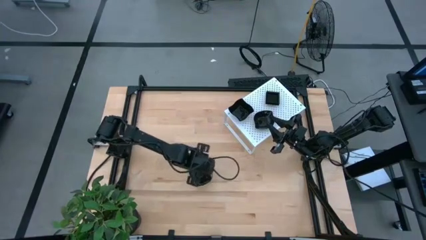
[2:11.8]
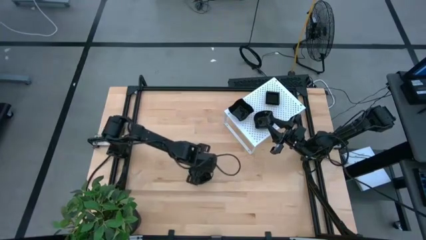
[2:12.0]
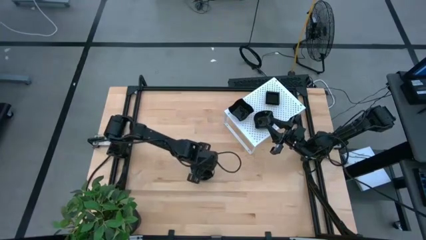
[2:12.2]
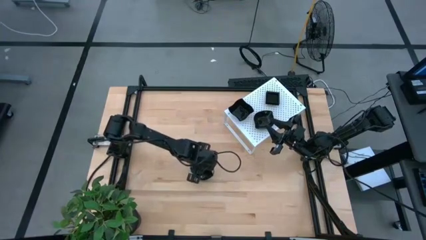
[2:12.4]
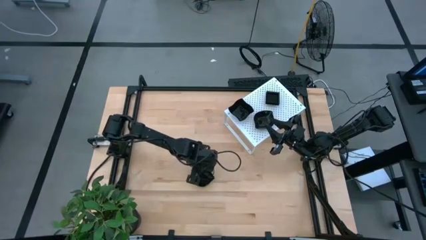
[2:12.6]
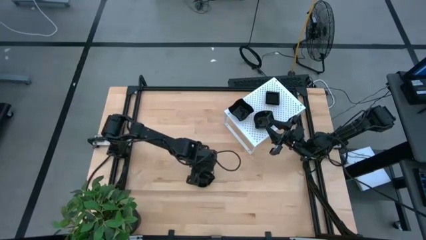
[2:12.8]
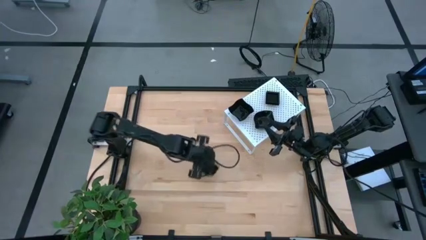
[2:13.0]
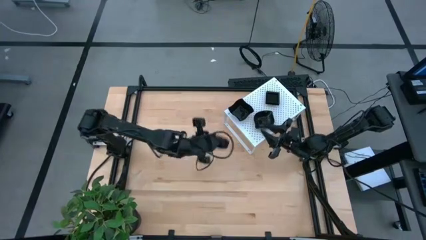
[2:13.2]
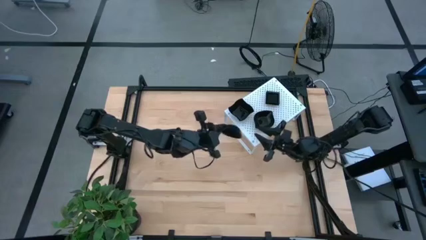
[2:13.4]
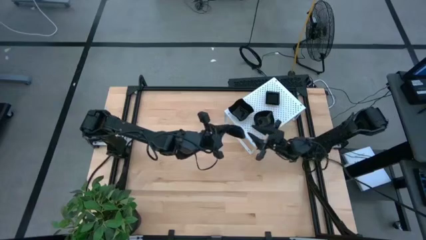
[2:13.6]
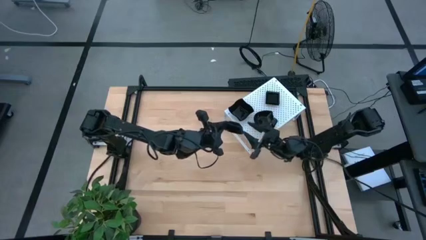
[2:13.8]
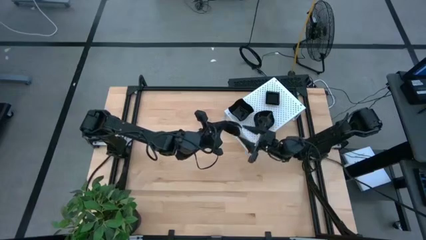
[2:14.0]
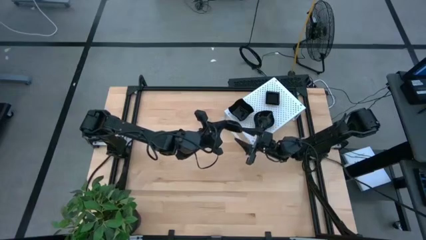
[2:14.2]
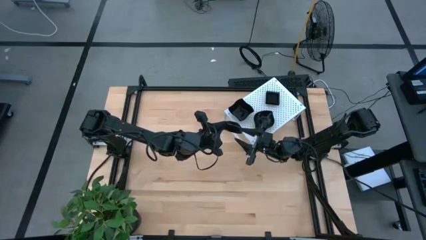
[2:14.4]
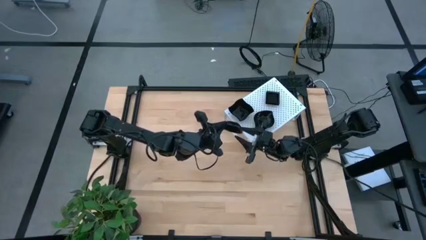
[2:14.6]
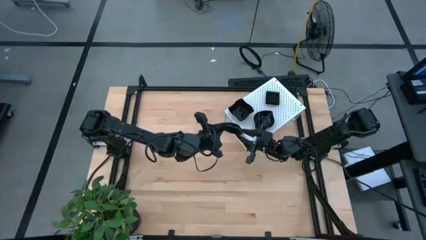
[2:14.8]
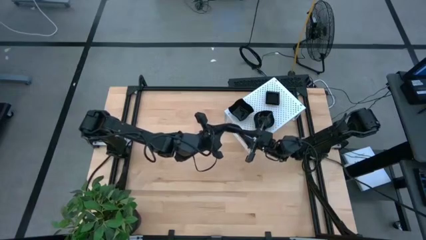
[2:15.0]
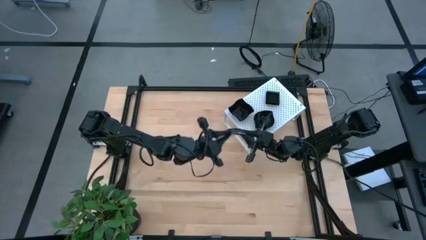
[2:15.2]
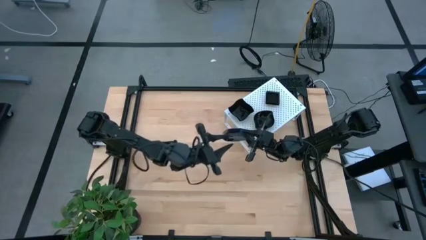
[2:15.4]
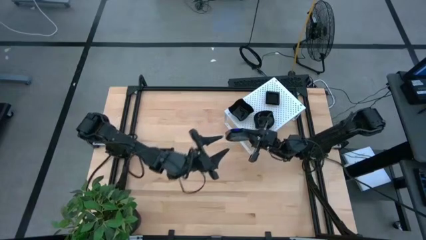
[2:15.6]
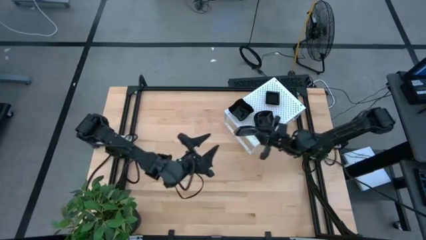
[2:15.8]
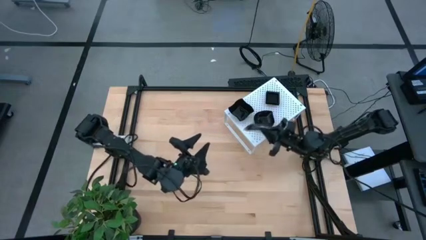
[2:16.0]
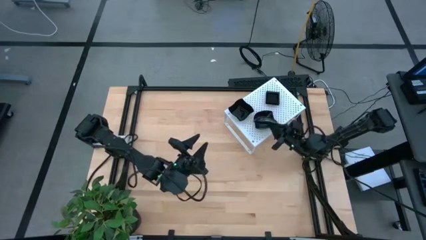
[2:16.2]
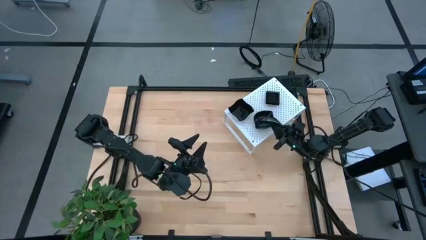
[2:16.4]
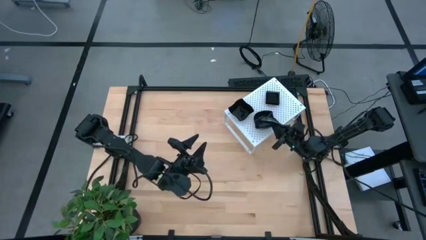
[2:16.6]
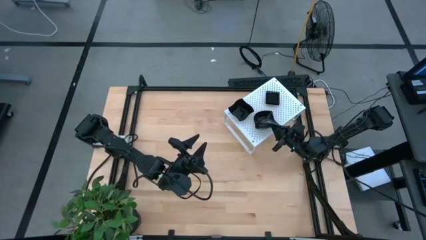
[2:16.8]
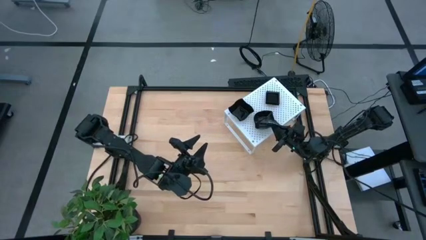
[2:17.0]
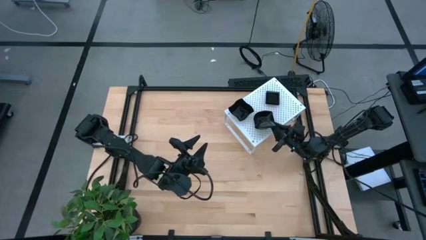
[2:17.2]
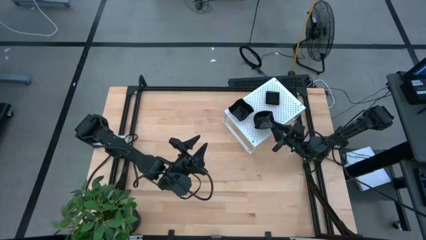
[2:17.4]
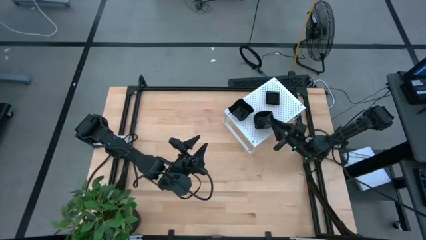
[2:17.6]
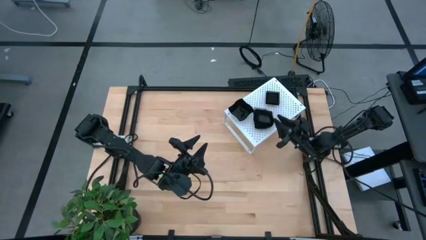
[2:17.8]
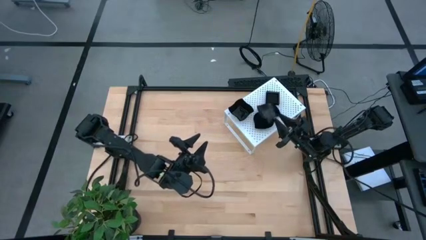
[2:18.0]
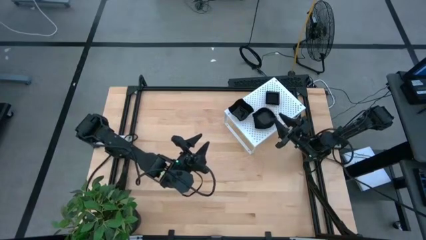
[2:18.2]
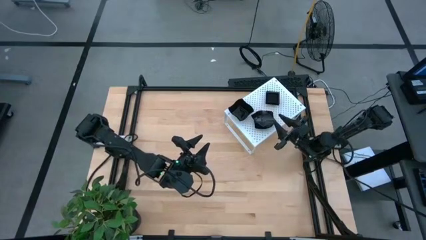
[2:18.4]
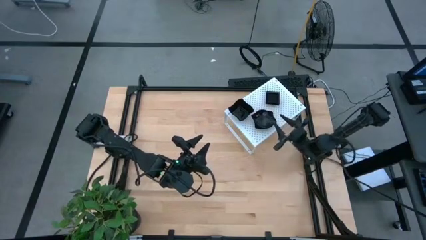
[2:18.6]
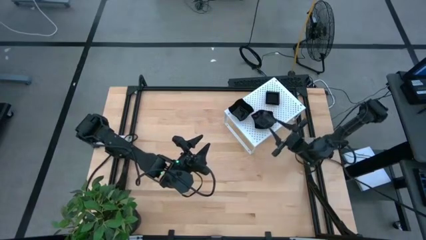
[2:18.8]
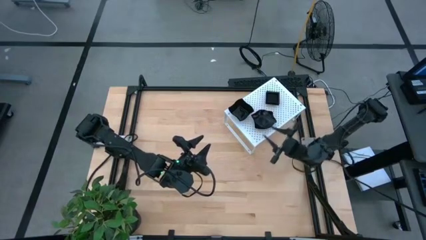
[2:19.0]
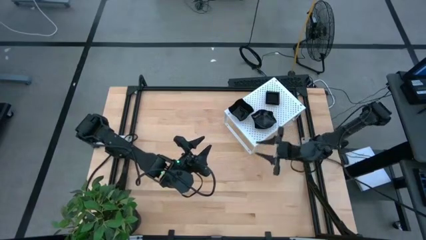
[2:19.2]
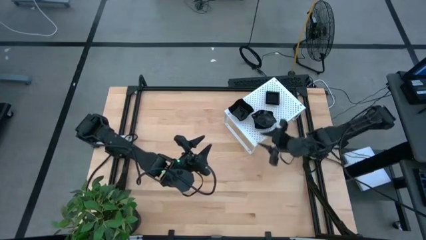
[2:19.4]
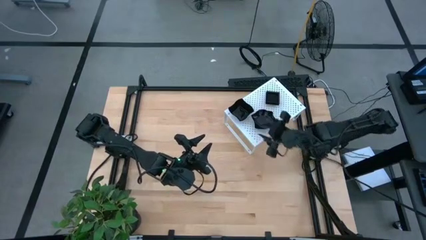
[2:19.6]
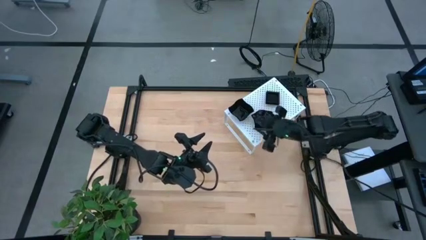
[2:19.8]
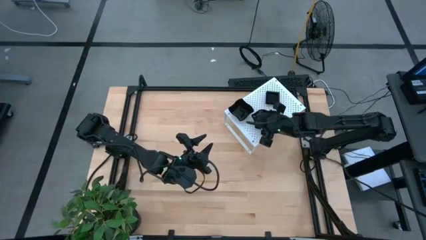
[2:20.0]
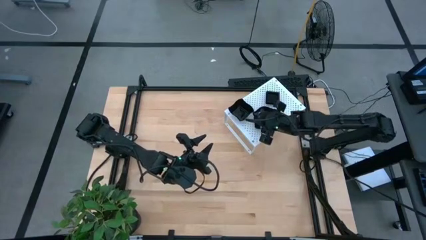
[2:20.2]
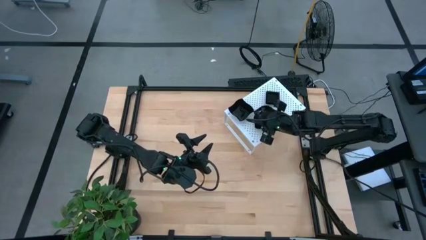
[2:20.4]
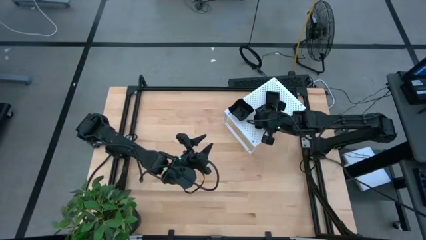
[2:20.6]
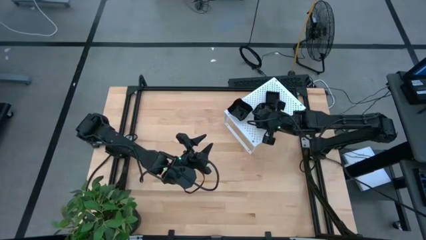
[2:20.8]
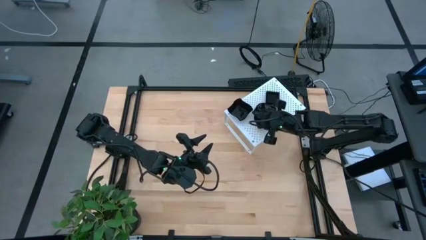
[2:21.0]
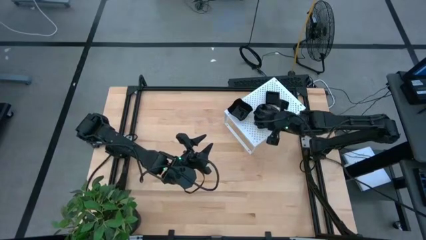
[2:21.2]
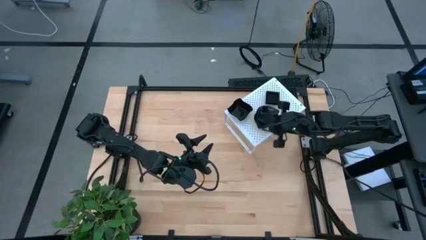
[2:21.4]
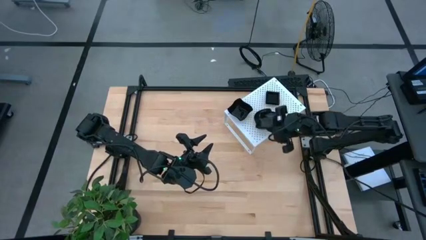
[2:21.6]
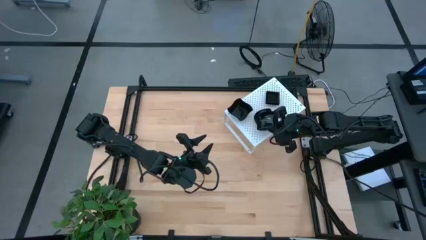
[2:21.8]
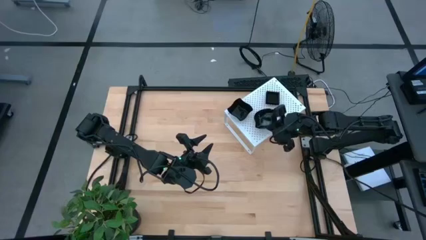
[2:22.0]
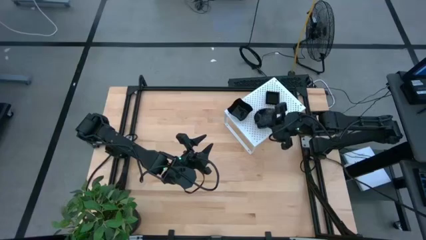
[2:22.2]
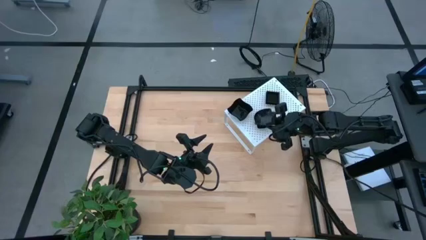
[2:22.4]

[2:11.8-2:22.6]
Task: Pick & Place Mini shaped plates
Stack the black leaf shaped plate on top of the black leaf shaped plates on the shelf

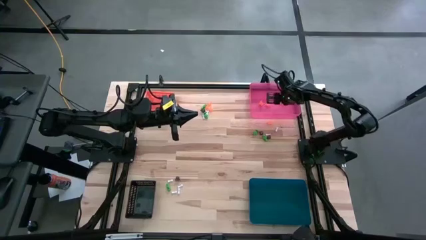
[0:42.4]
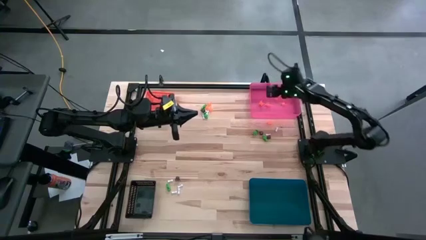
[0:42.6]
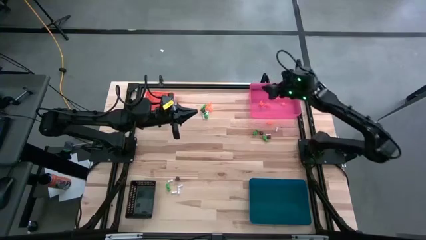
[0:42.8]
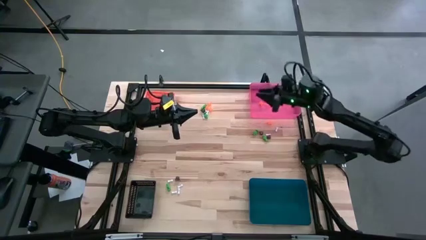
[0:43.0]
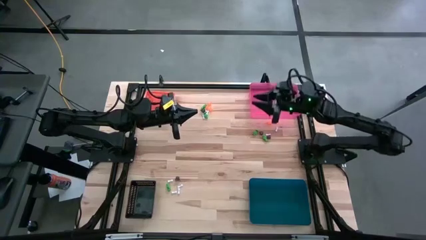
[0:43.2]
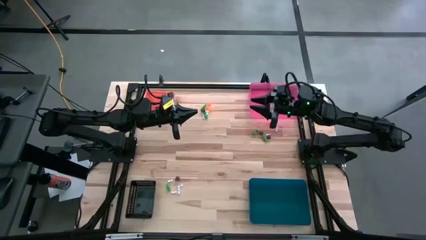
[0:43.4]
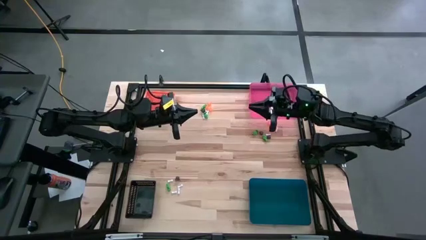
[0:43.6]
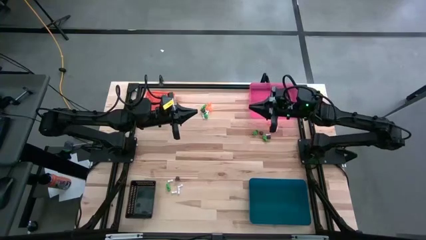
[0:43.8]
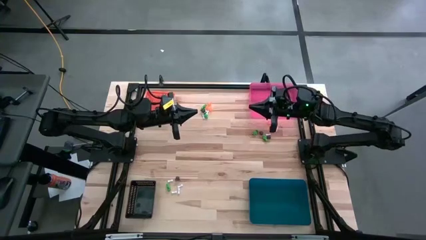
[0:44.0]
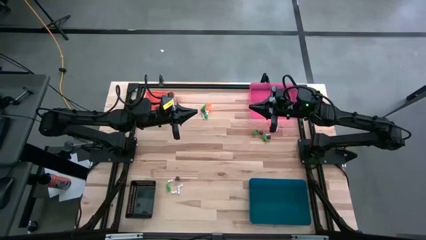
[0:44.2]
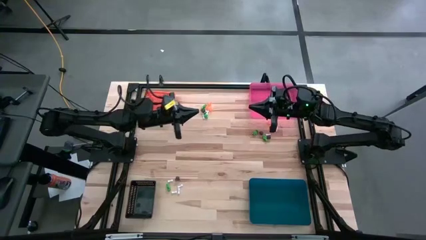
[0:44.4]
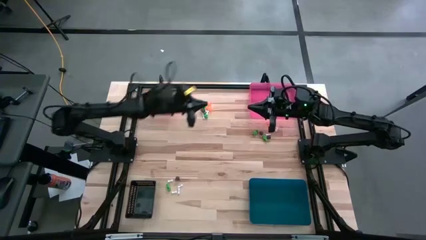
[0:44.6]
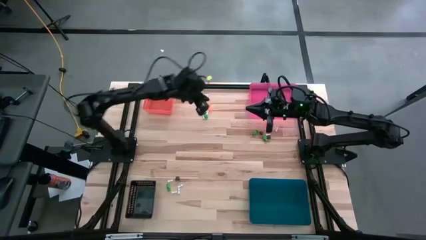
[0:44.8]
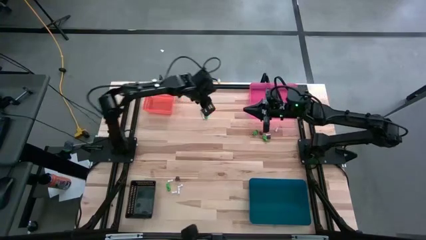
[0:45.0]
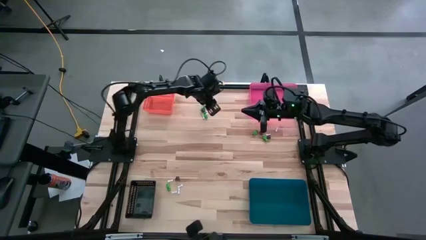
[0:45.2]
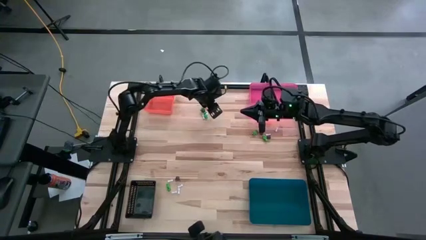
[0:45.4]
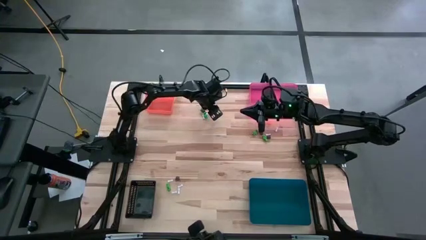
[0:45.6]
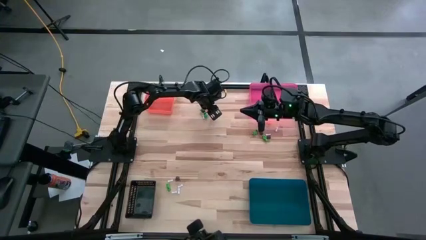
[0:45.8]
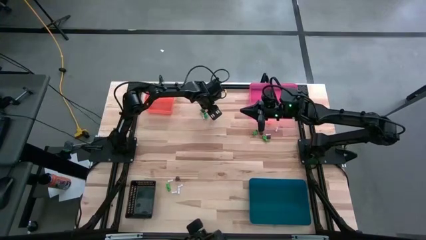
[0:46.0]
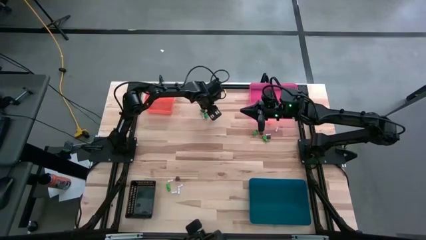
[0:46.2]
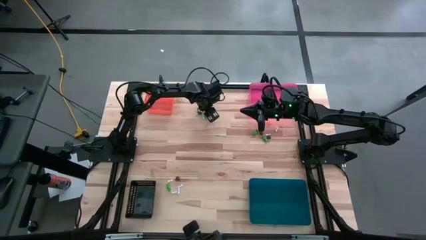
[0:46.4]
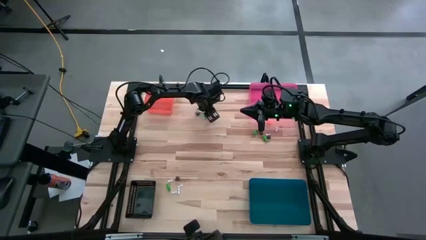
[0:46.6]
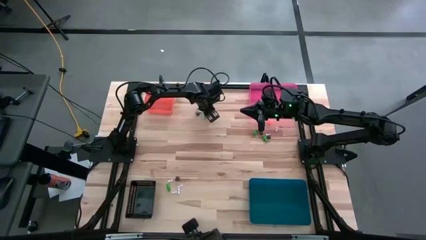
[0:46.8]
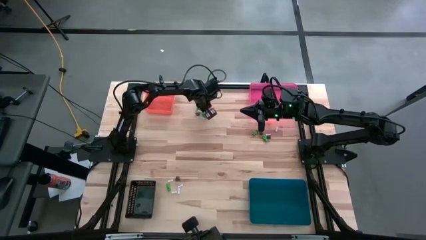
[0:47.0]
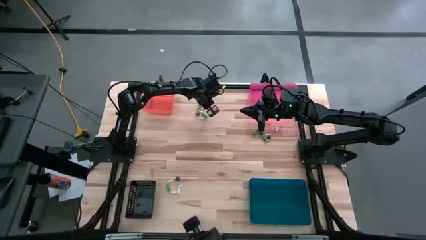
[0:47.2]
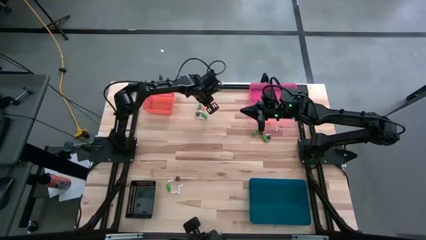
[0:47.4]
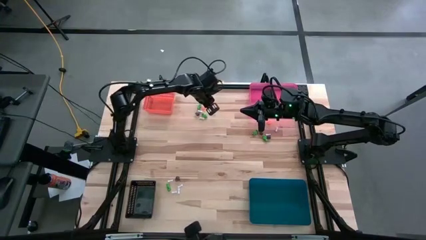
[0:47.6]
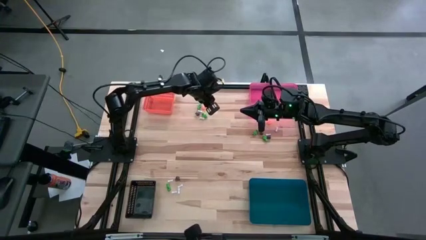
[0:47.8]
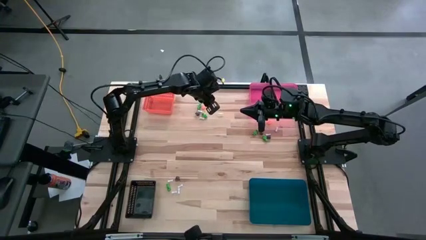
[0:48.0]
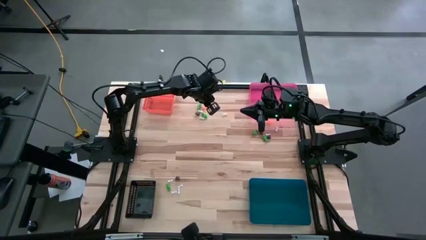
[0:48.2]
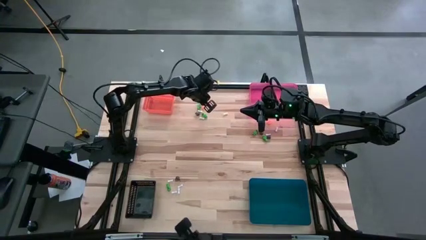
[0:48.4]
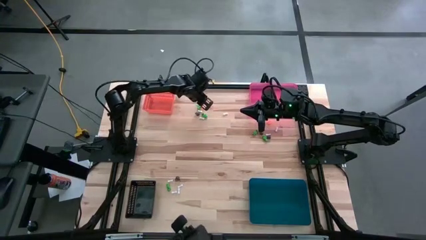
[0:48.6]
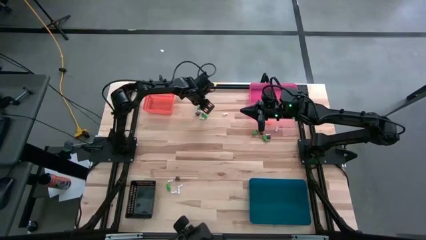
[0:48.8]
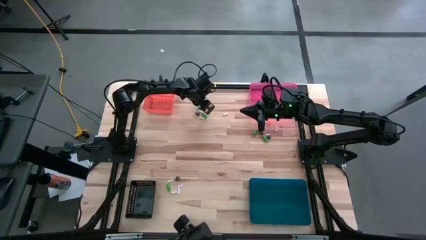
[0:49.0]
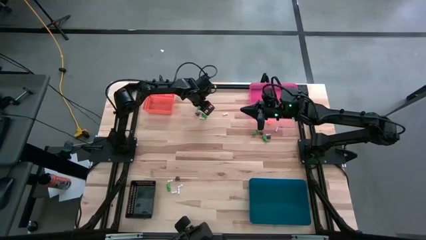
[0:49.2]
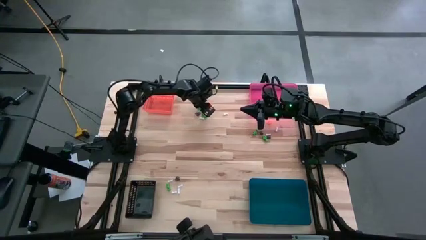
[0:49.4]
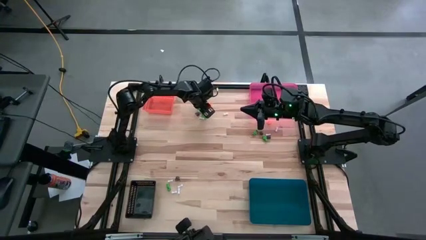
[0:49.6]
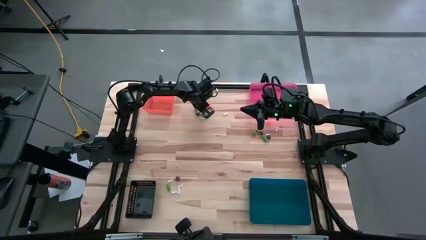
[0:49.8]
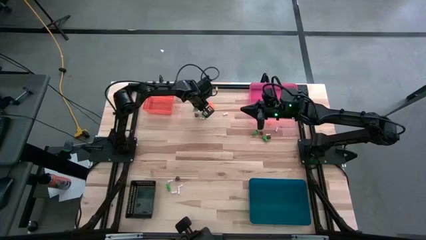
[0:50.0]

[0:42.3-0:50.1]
Task: Sort Halloween decoration
Put the orange spider toy into the pink bin
